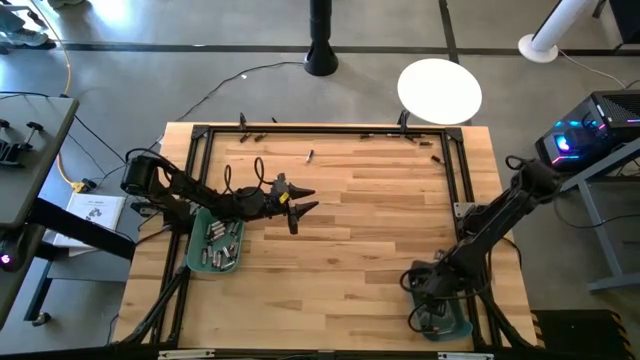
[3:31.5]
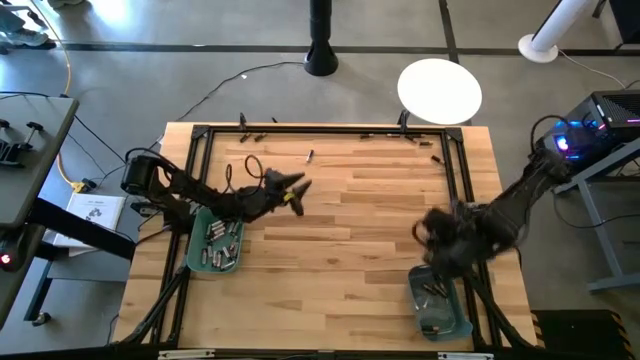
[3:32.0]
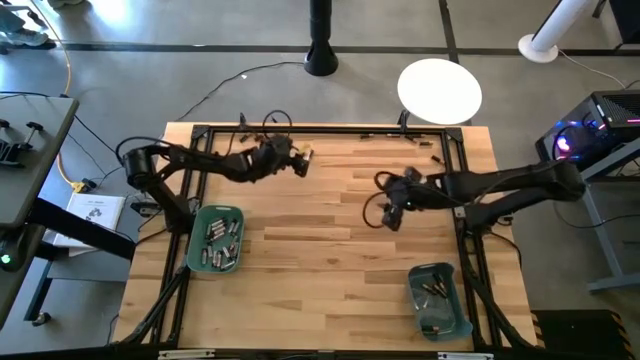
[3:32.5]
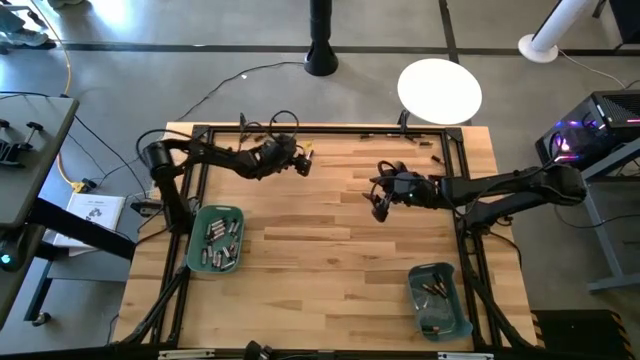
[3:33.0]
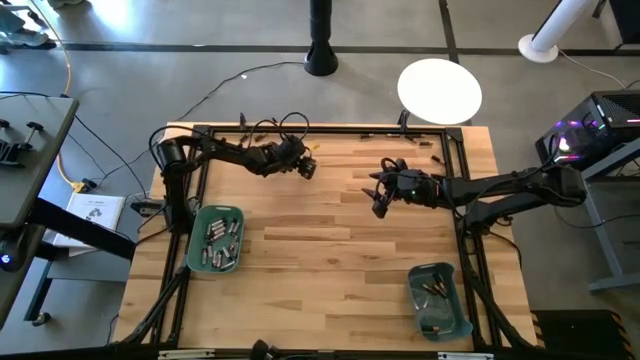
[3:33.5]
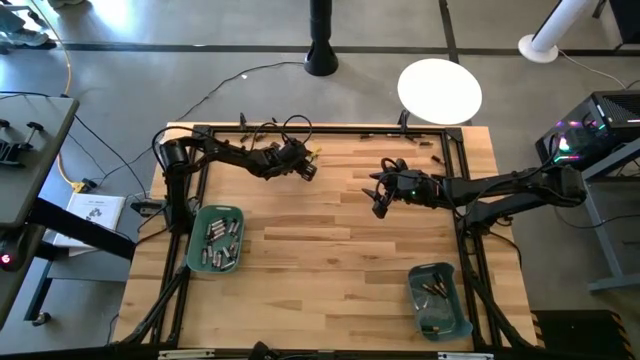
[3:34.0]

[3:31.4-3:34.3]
Task: Sort batteries
Put the black battery into the blue bin

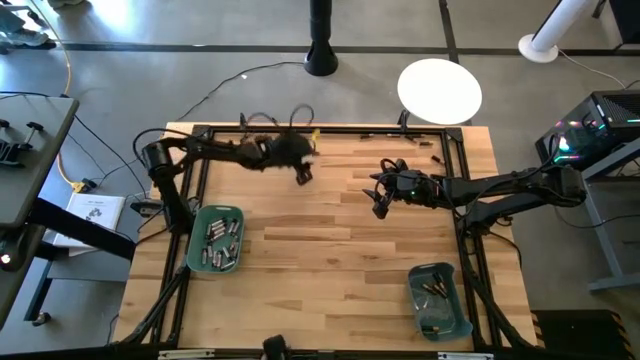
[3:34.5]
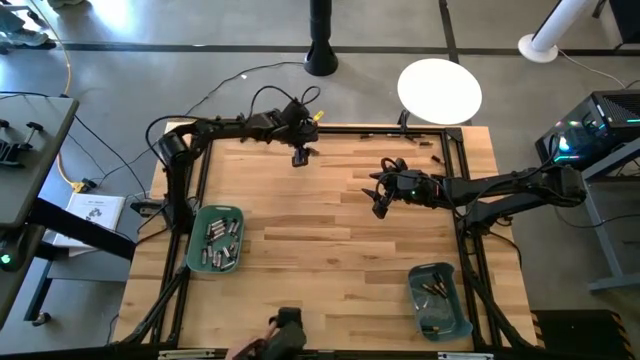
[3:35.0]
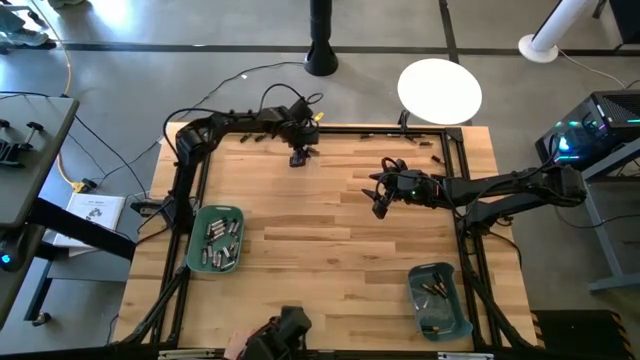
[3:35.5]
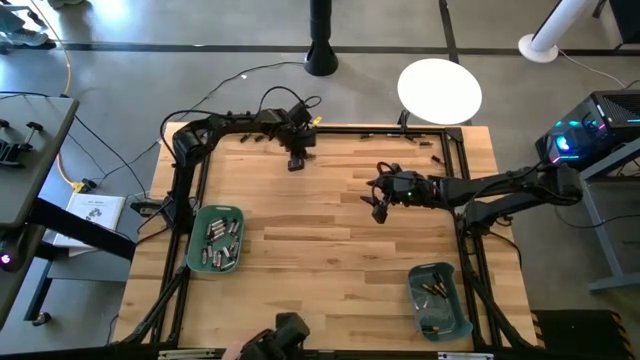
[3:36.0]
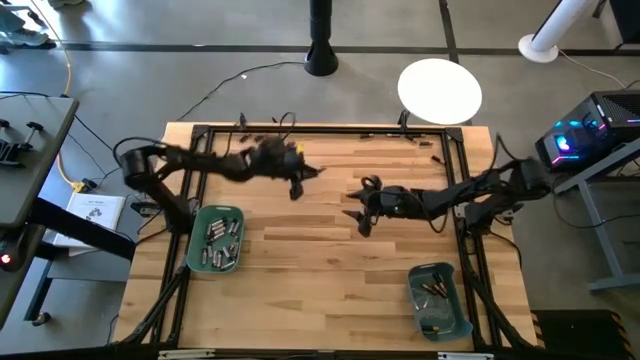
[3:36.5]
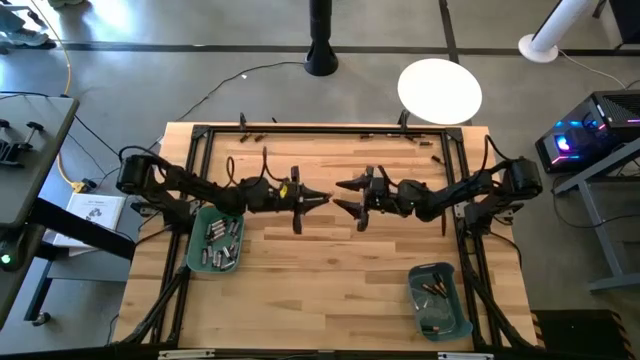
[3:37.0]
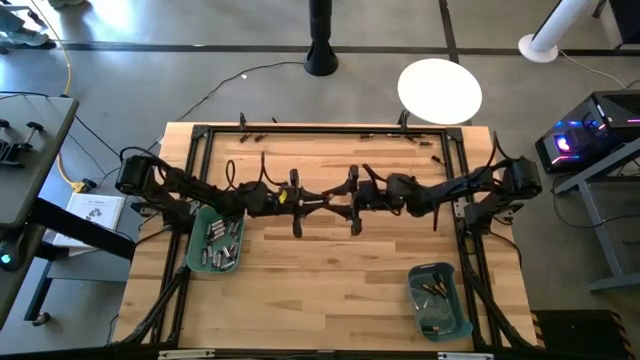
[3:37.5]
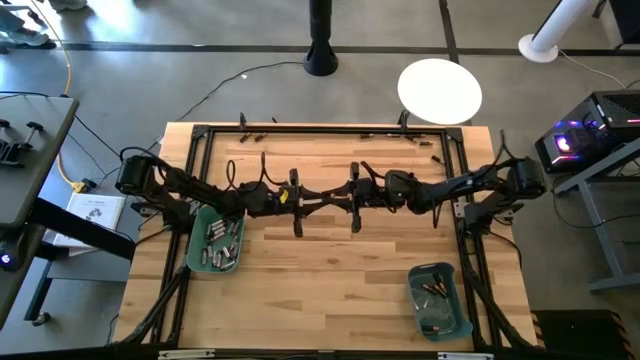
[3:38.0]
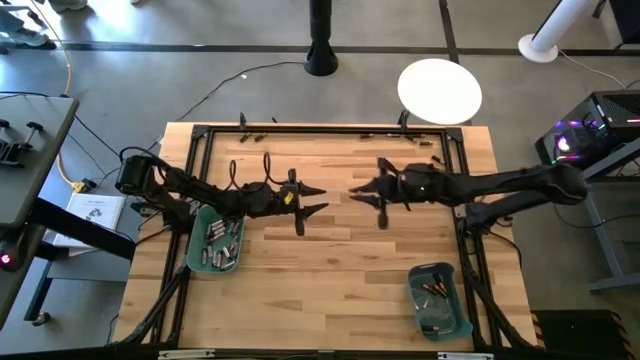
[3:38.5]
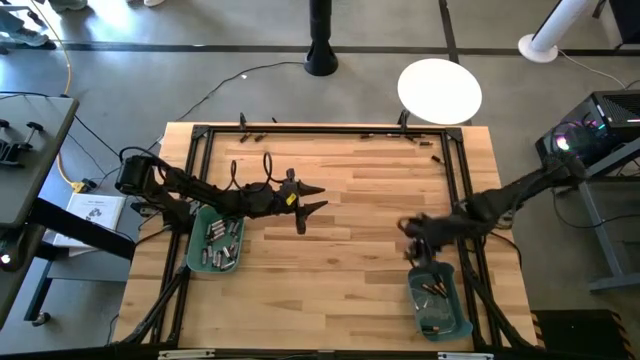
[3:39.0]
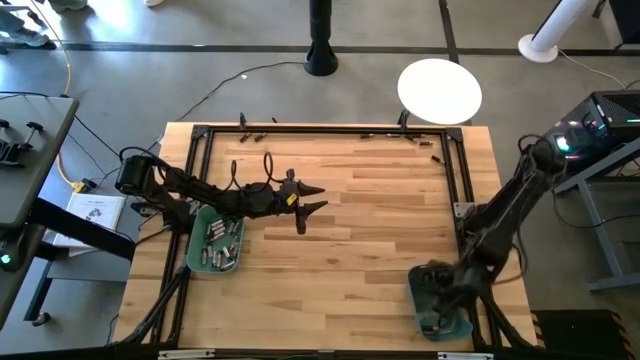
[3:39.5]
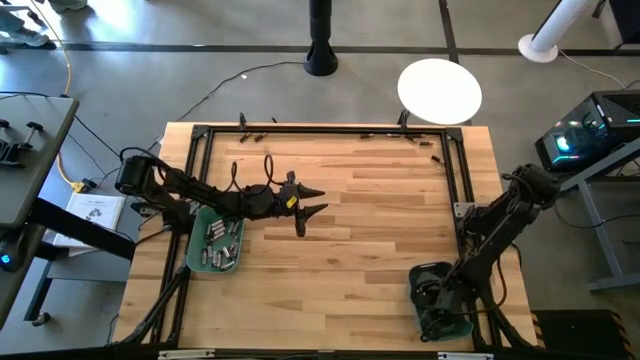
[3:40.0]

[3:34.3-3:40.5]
Put the black battery into the blue bin

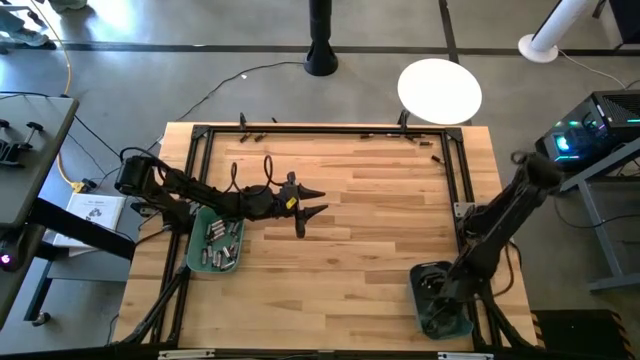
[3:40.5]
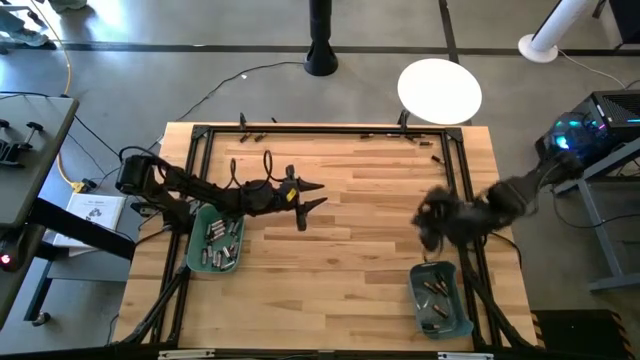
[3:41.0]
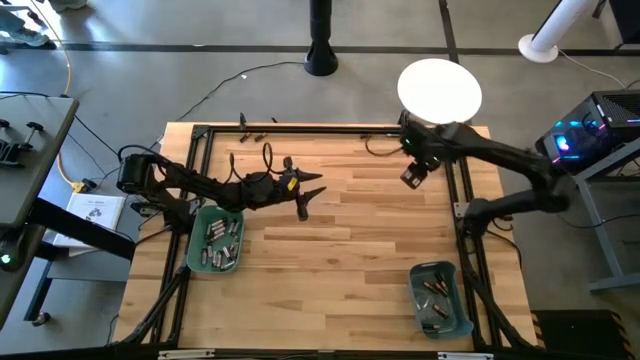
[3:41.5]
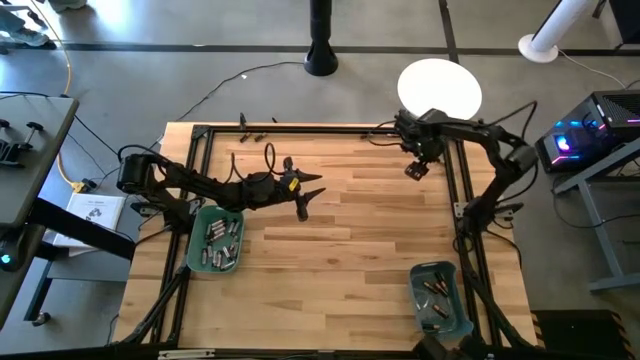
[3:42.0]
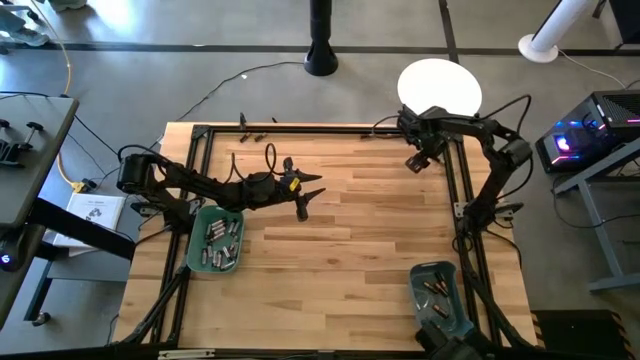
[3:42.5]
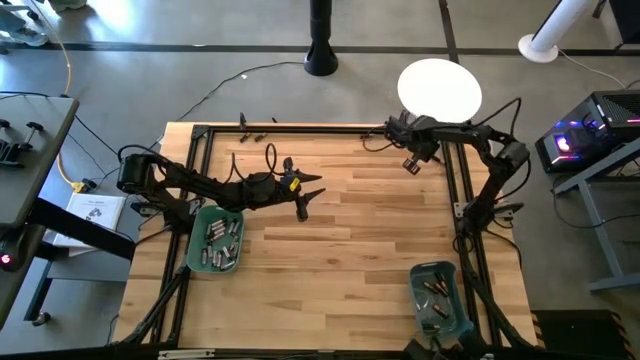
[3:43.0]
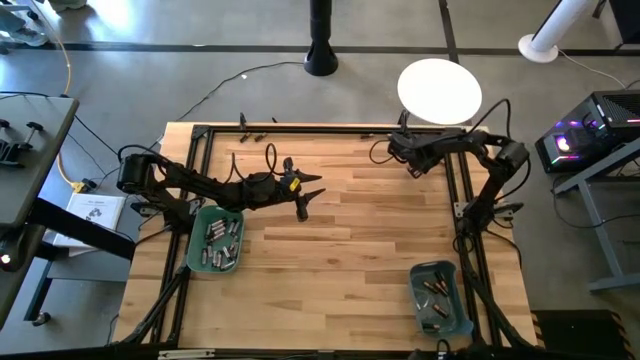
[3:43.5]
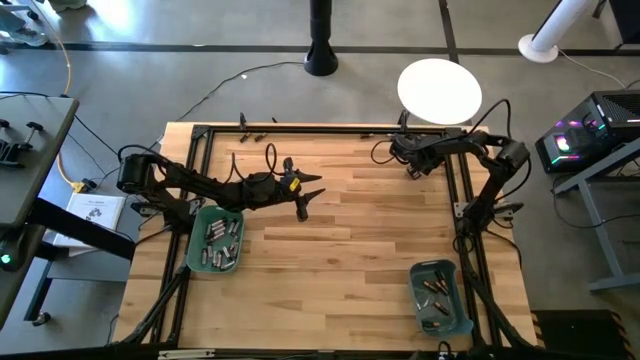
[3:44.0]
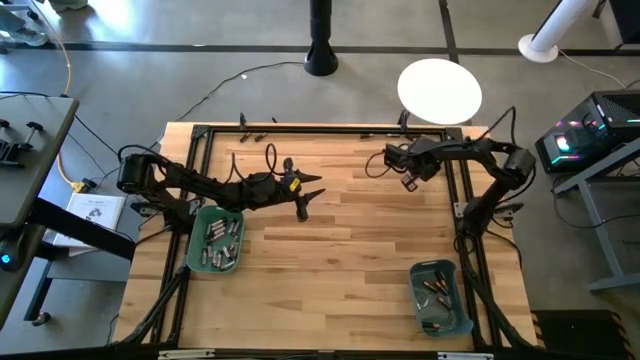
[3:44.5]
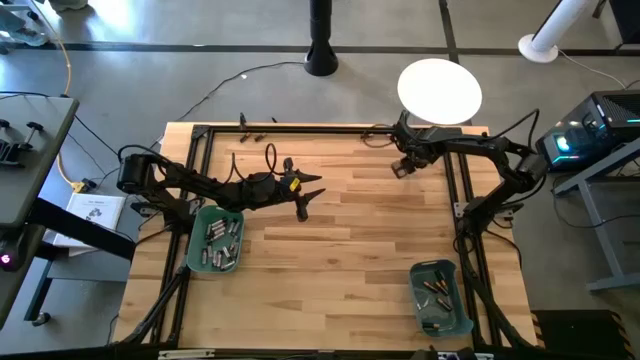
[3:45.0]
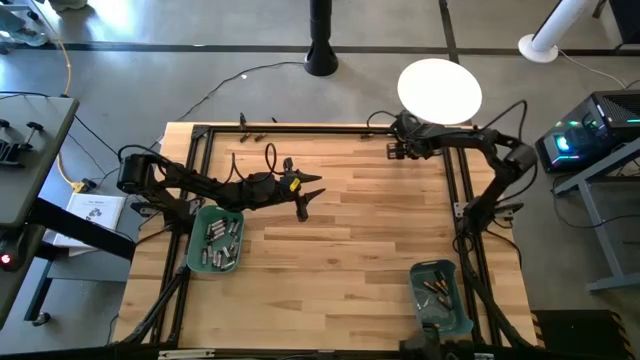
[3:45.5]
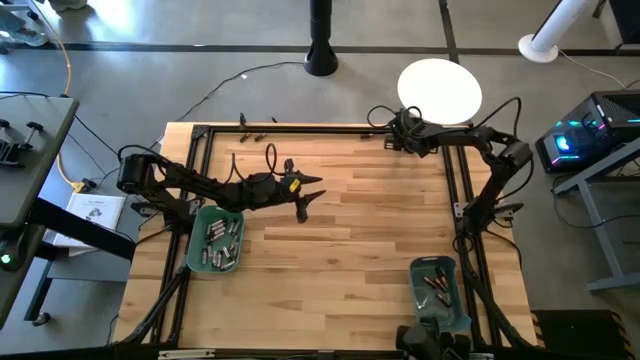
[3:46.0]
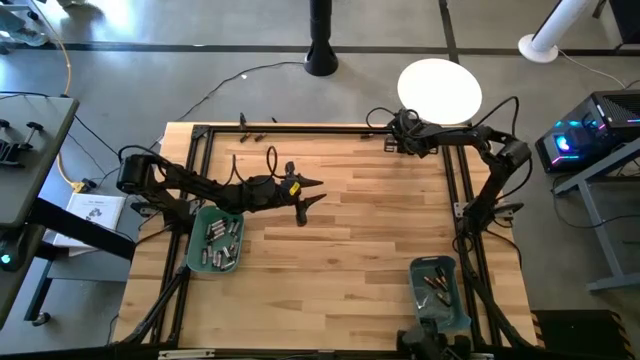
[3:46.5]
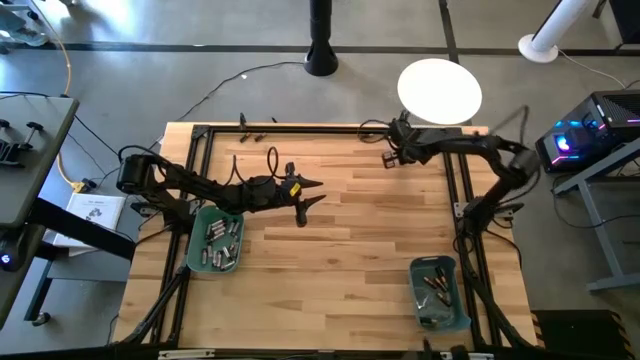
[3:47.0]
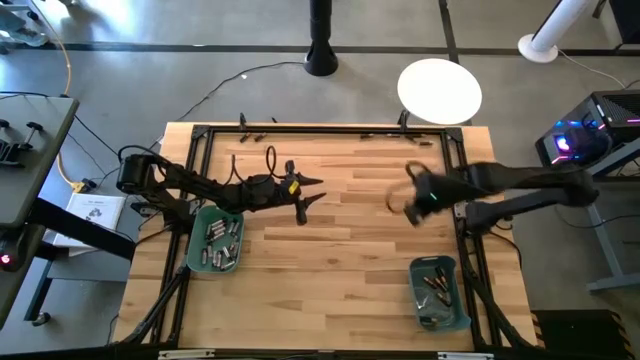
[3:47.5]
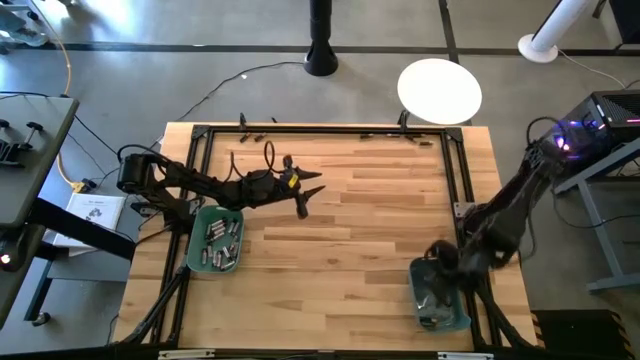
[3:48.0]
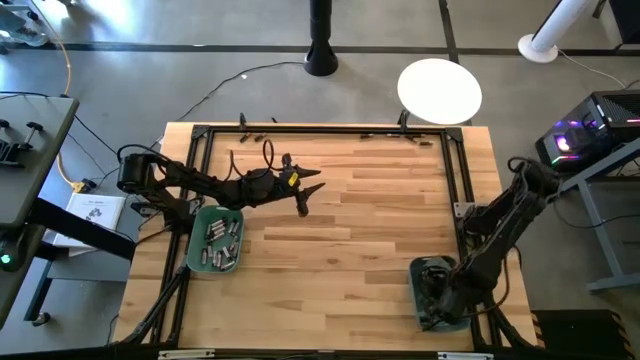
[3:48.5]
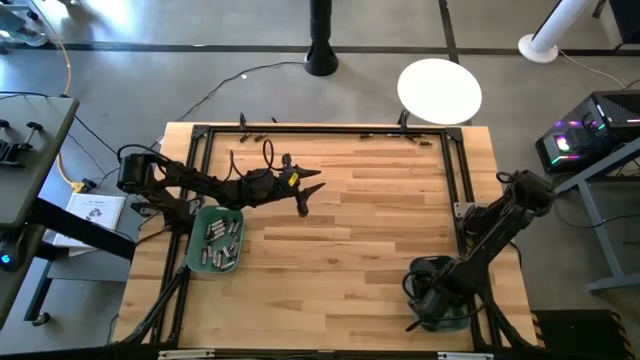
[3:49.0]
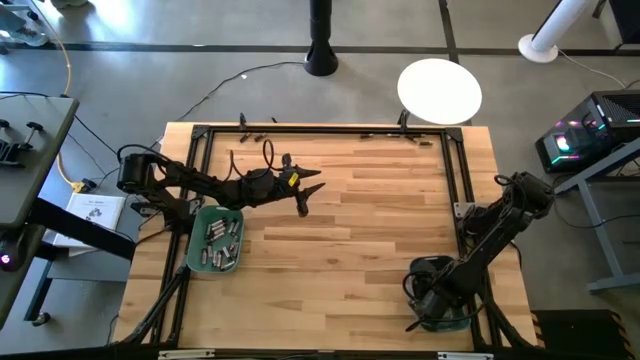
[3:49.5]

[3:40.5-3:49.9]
Put the black battery into the blue bin

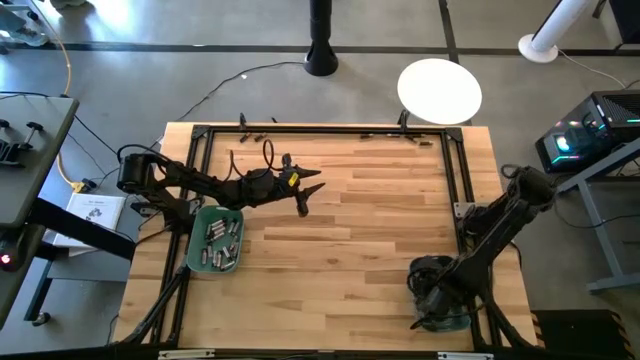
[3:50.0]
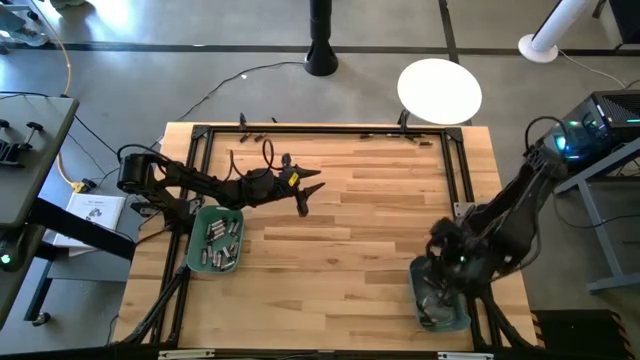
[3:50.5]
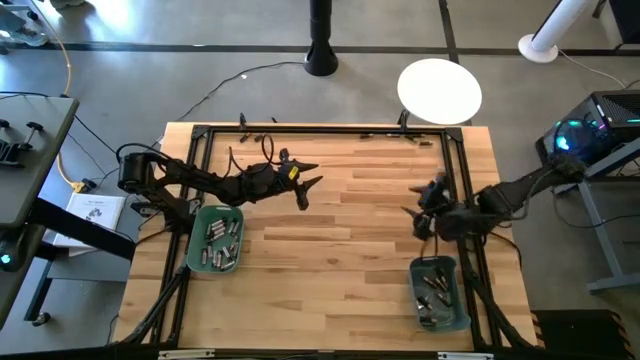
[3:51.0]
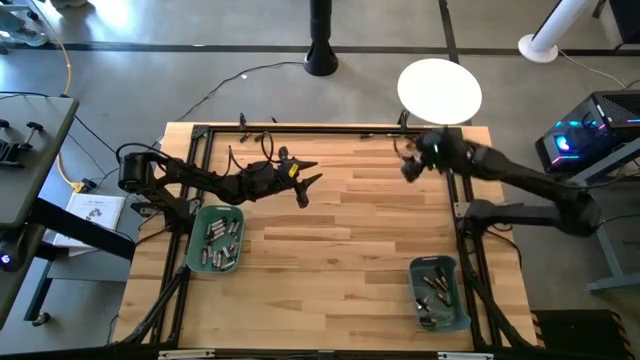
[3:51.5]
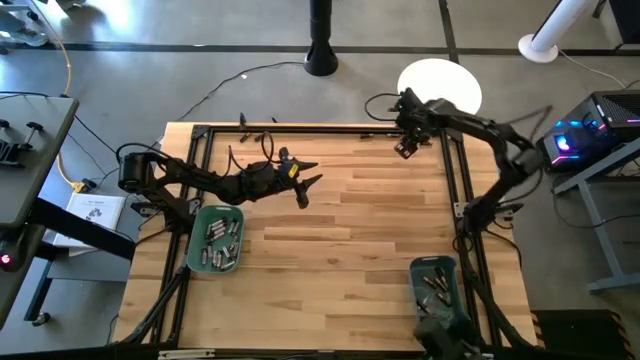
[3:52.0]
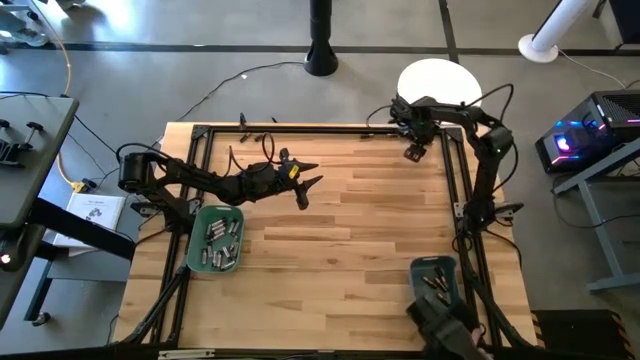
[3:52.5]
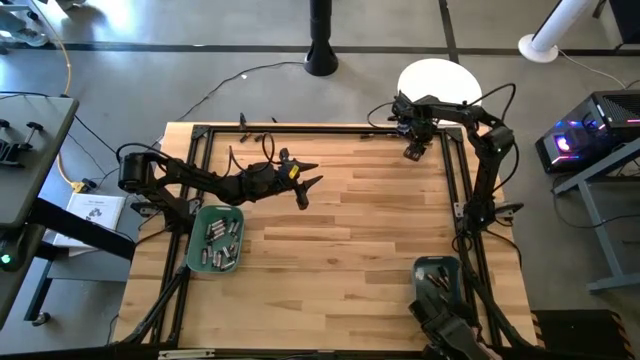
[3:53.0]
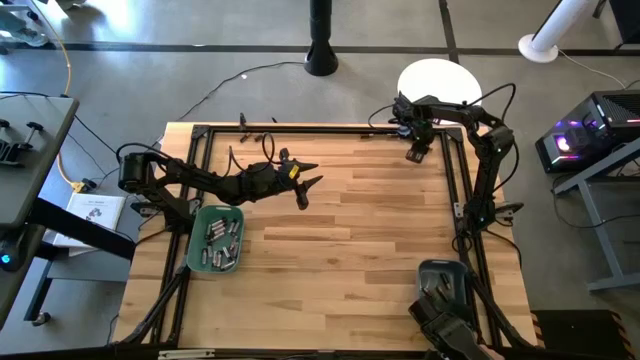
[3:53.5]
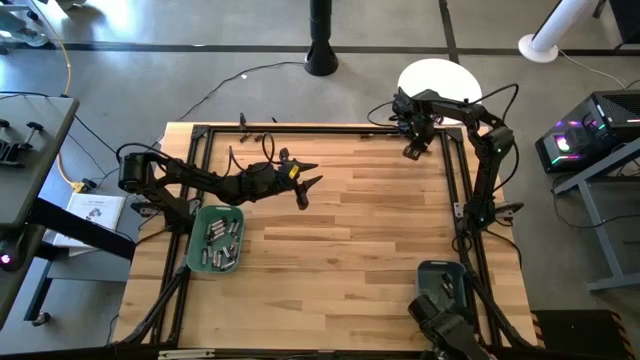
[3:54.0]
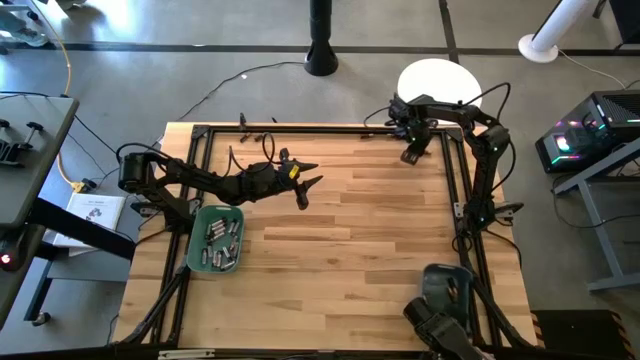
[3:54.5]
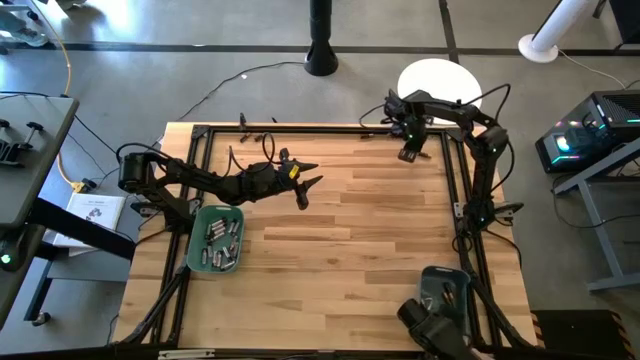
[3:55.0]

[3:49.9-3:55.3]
Put the black battery into the blue bin
